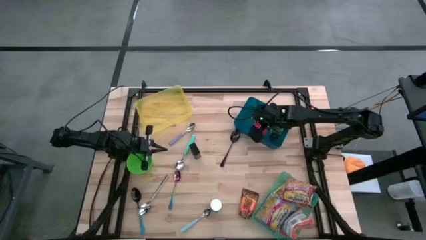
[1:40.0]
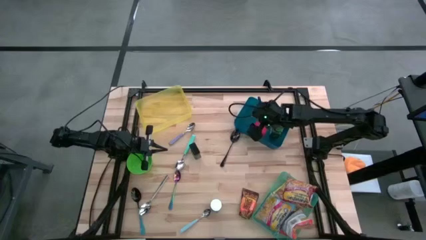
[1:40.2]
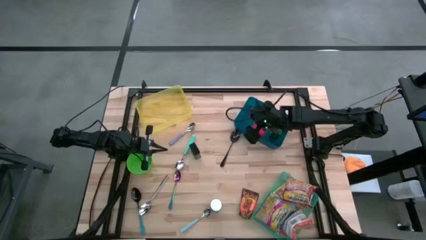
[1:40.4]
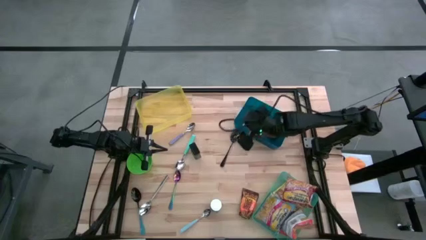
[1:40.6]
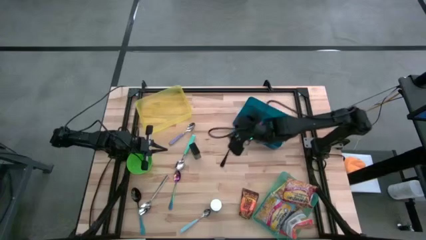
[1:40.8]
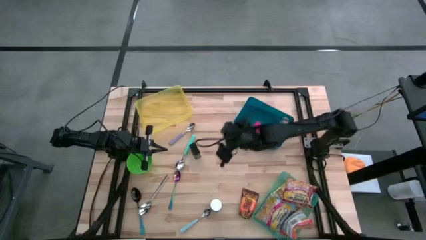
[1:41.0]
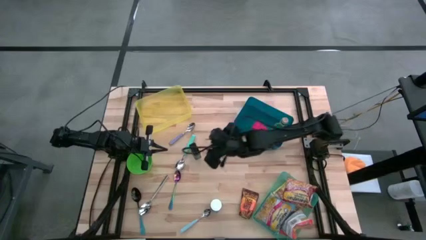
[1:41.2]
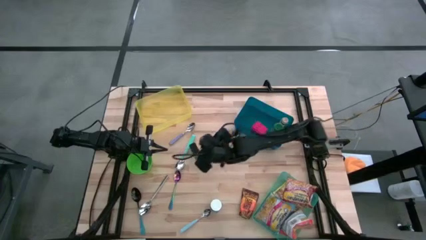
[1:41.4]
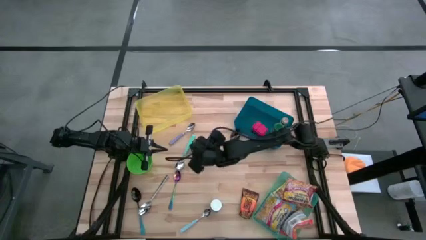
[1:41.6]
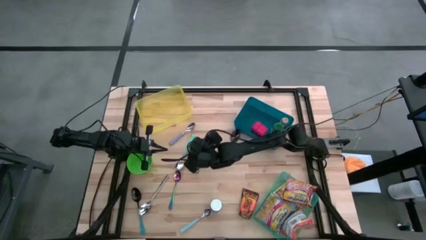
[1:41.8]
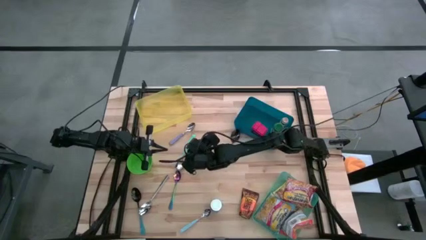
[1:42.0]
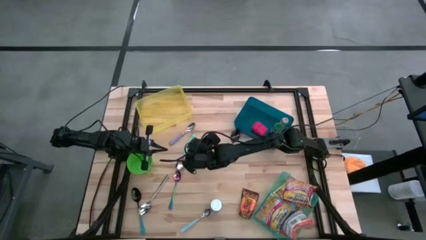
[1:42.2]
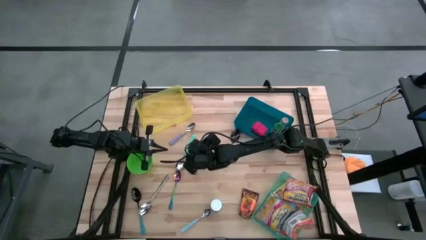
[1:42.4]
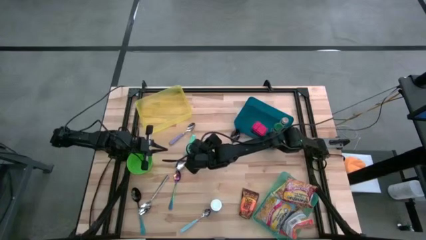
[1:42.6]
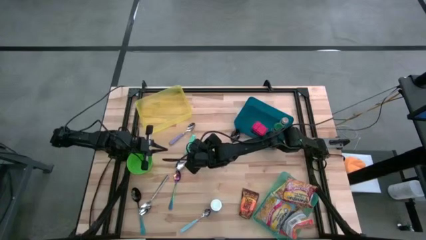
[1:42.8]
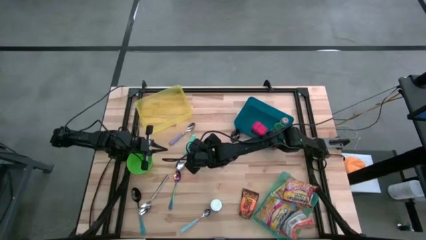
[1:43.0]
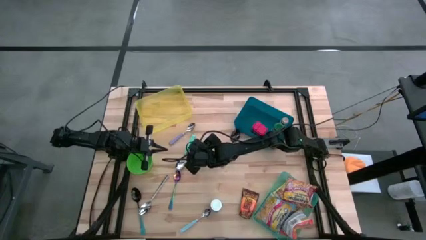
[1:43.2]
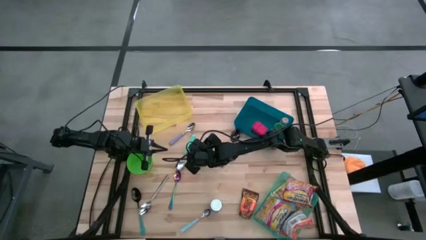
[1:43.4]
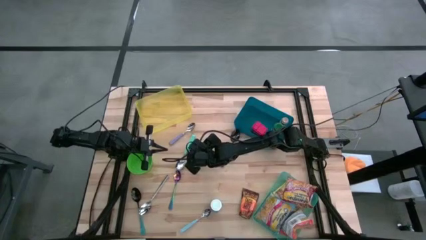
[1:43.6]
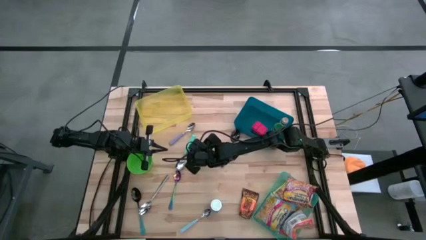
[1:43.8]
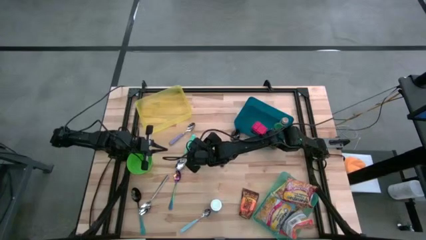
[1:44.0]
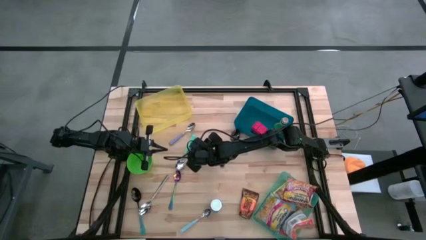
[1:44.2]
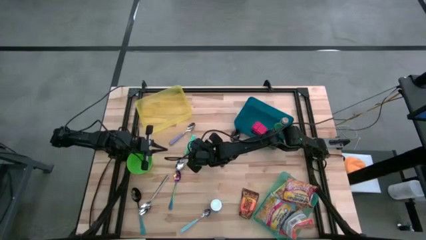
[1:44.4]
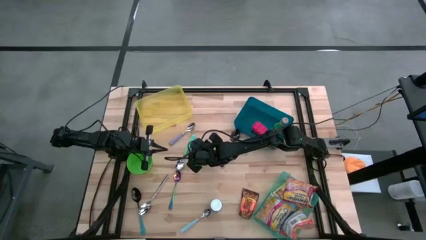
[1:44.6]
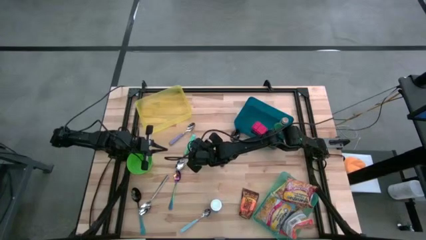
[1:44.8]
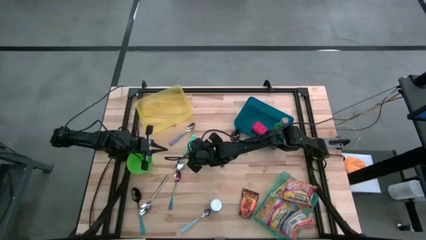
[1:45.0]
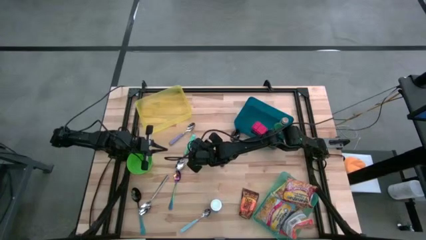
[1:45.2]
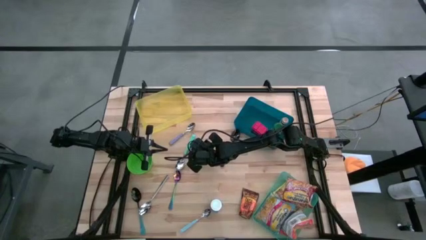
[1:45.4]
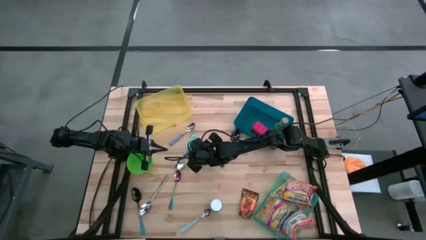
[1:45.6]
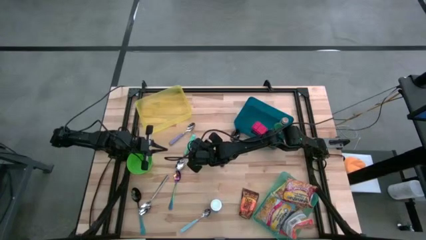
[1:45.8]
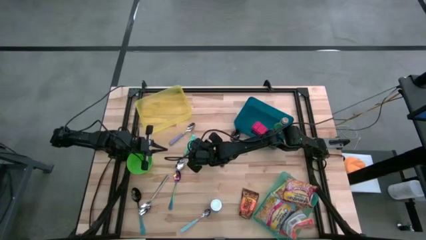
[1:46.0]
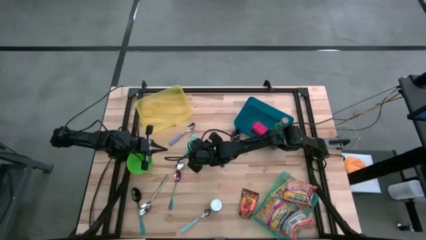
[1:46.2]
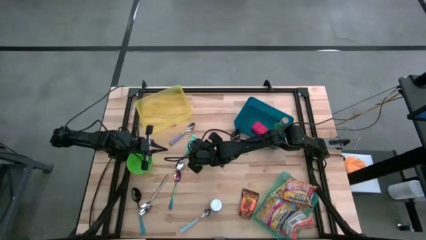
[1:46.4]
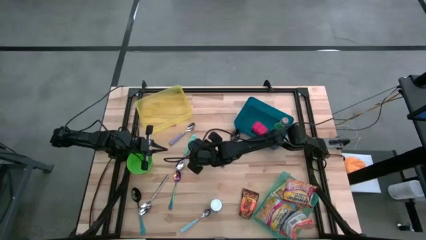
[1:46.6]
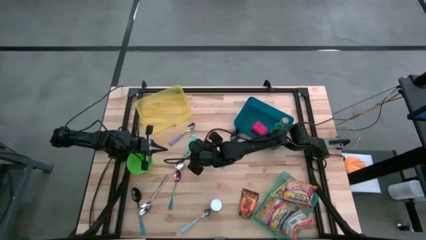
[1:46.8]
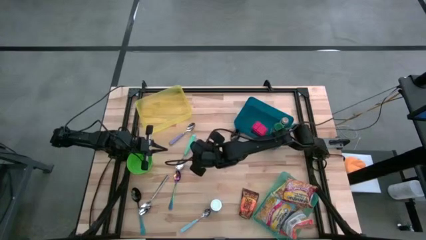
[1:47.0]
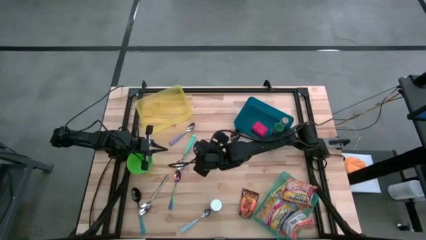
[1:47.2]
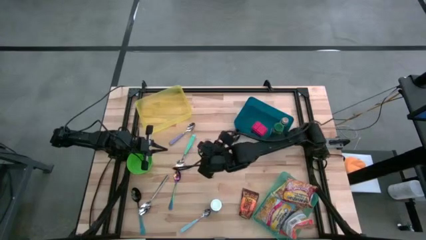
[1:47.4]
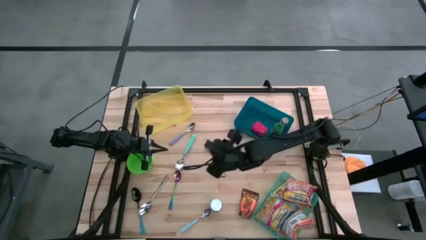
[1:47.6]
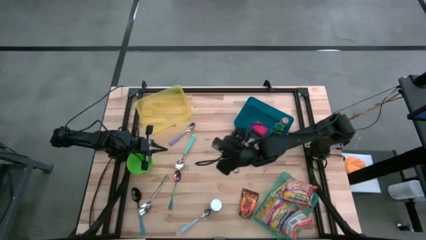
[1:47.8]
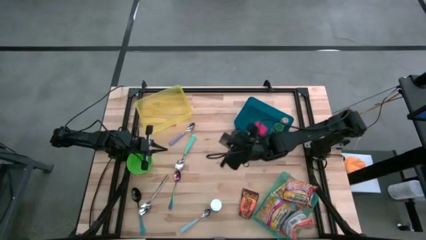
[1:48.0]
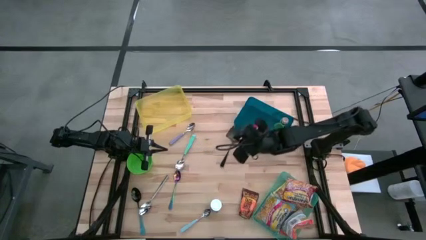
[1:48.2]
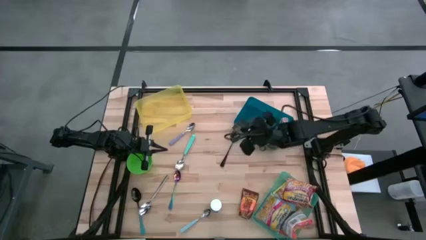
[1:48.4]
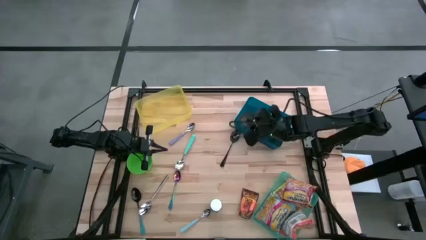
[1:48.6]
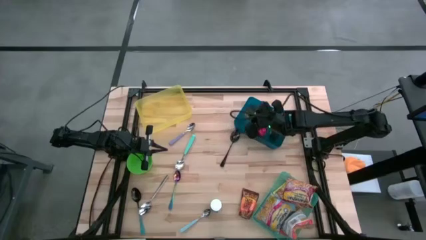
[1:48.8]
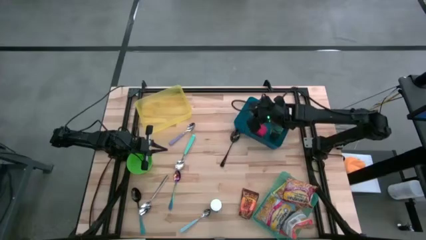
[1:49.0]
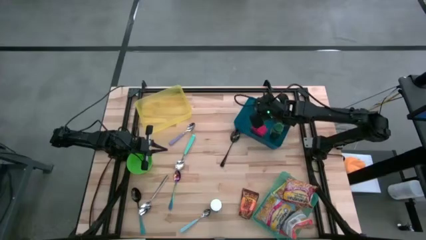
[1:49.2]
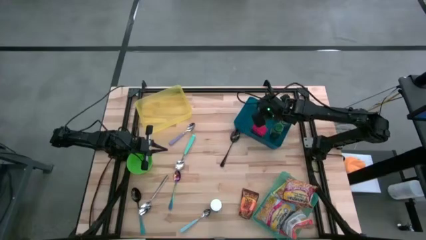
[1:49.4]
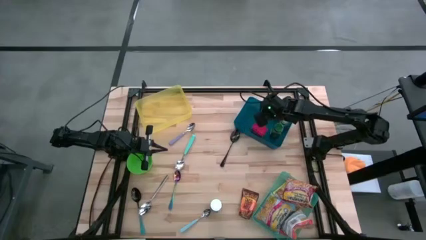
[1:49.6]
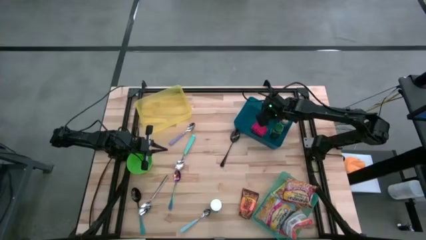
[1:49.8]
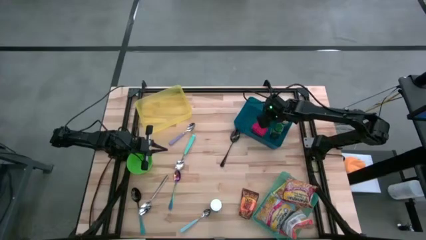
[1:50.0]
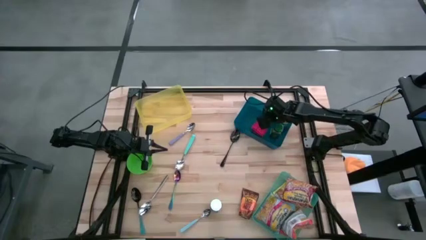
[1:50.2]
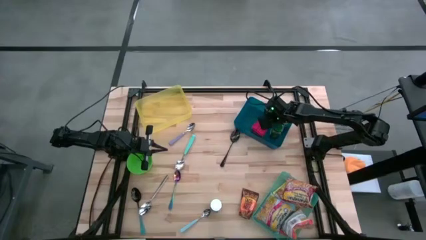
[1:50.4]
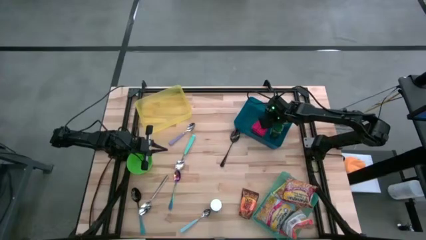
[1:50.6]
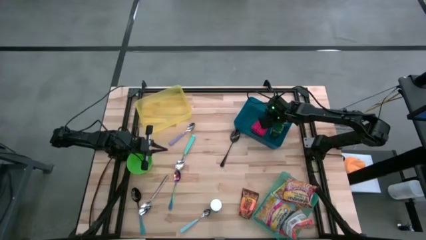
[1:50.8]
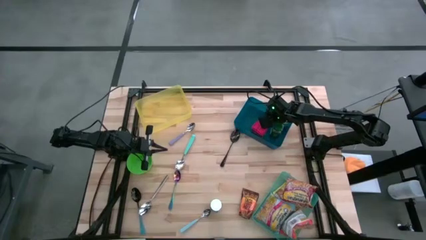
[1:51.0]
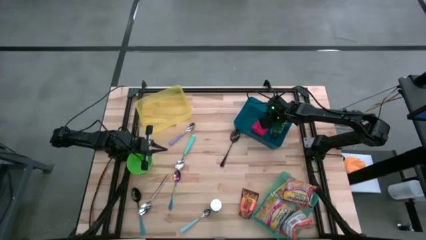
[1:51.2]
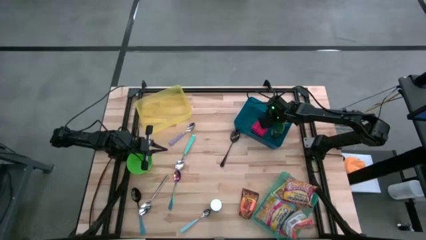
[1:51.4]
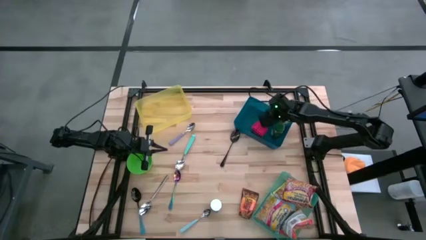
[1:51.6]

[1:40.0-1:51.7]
Put the green seasoning can into the blue bin
